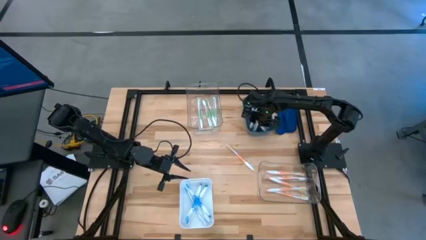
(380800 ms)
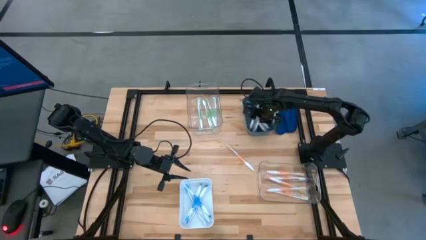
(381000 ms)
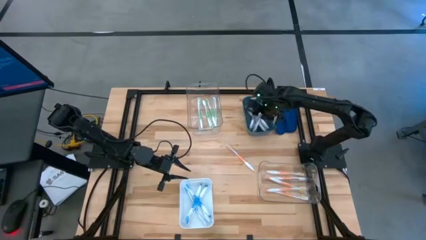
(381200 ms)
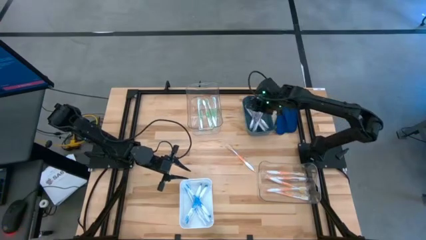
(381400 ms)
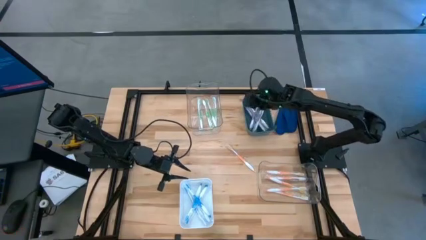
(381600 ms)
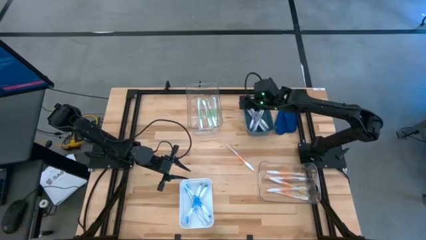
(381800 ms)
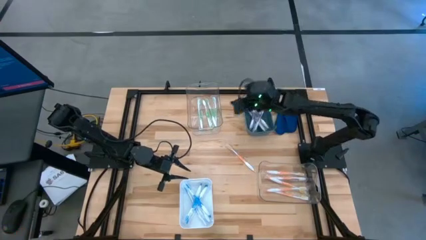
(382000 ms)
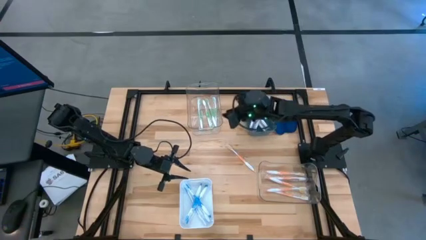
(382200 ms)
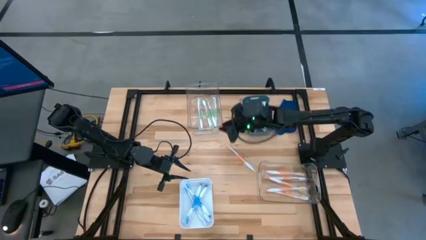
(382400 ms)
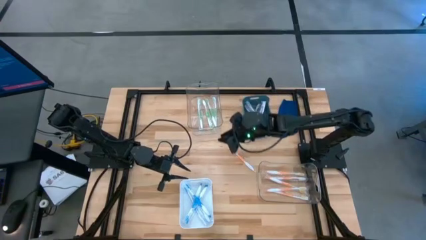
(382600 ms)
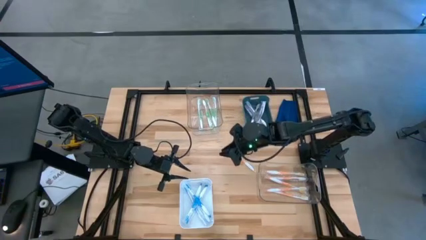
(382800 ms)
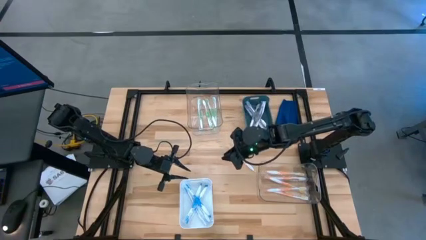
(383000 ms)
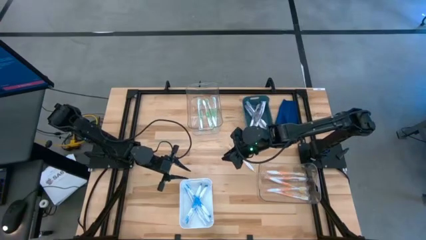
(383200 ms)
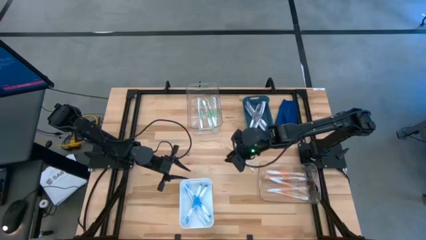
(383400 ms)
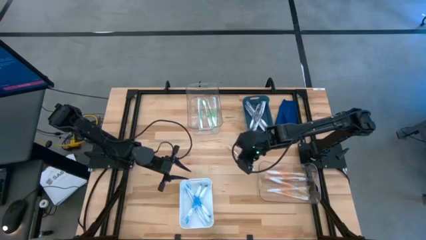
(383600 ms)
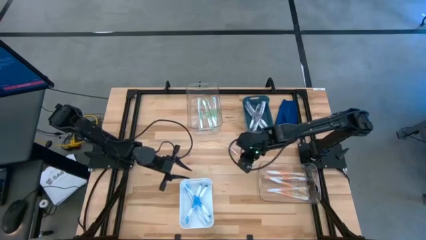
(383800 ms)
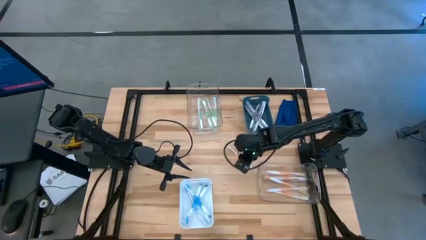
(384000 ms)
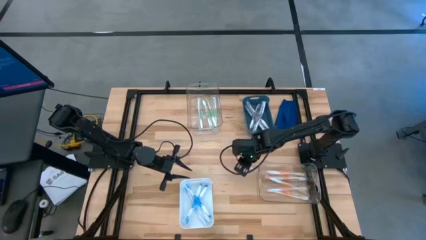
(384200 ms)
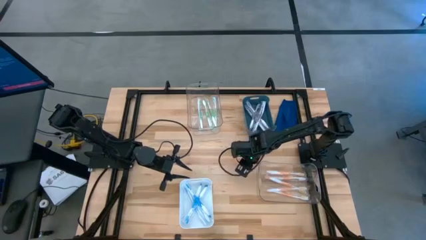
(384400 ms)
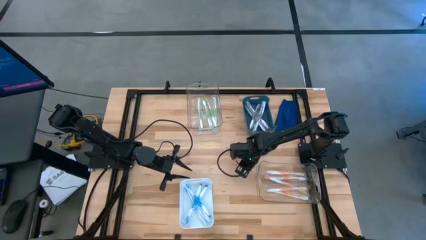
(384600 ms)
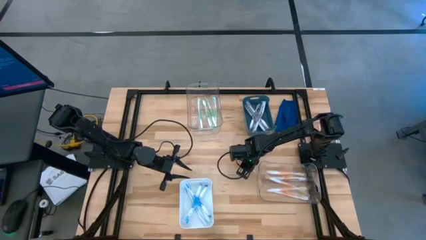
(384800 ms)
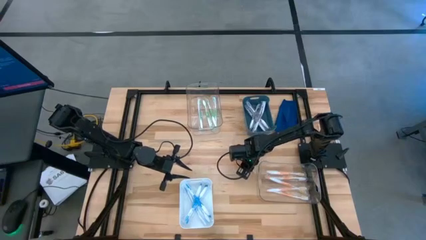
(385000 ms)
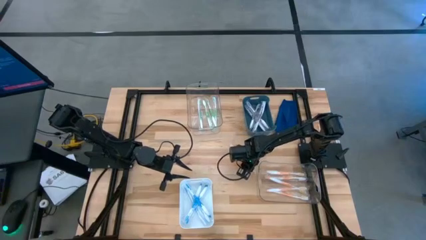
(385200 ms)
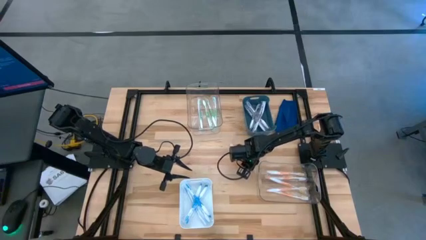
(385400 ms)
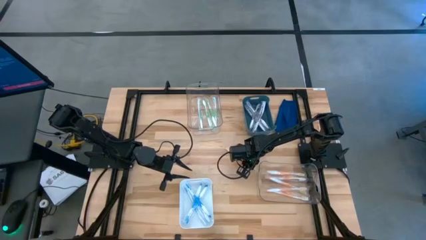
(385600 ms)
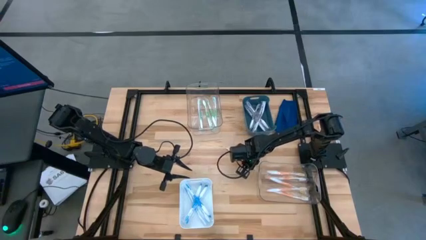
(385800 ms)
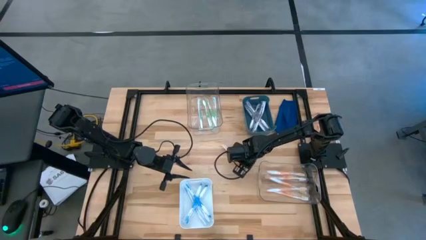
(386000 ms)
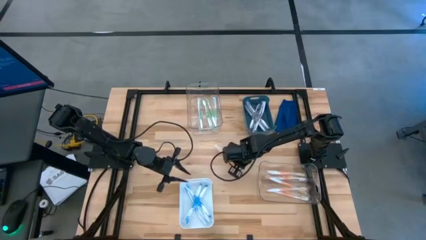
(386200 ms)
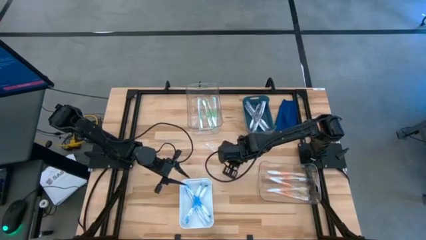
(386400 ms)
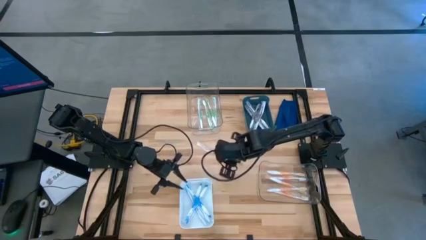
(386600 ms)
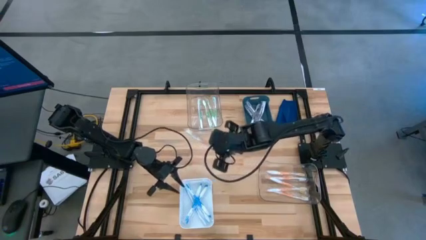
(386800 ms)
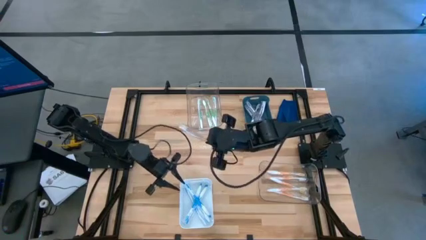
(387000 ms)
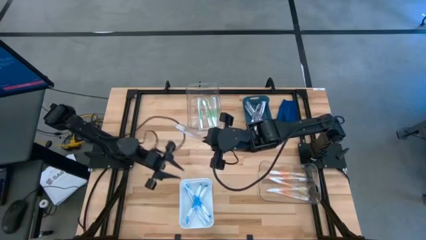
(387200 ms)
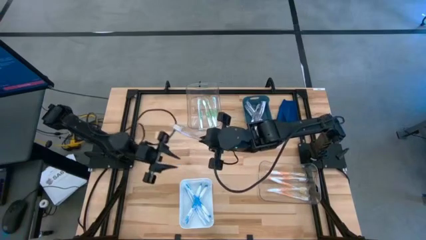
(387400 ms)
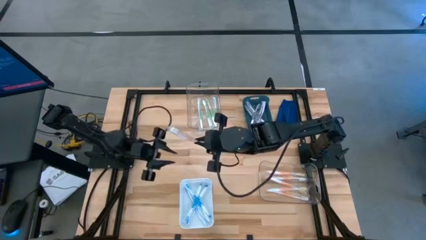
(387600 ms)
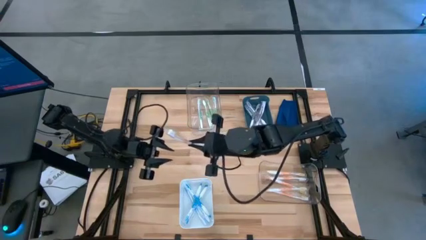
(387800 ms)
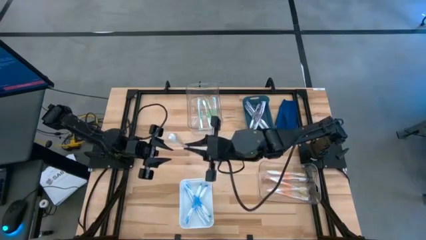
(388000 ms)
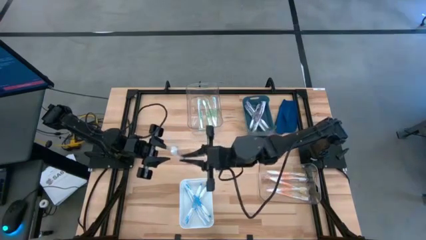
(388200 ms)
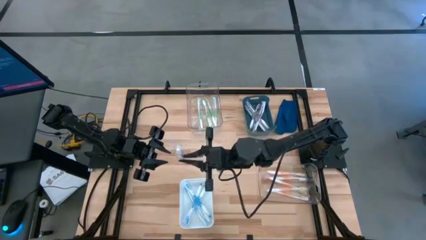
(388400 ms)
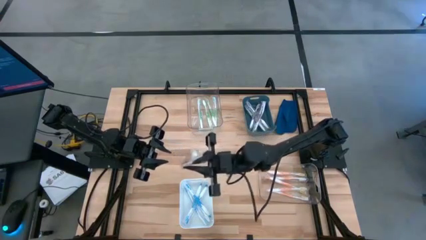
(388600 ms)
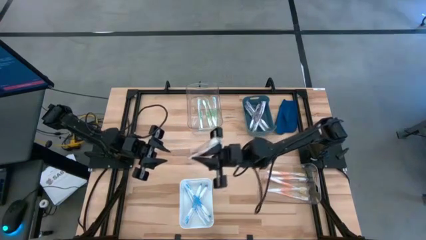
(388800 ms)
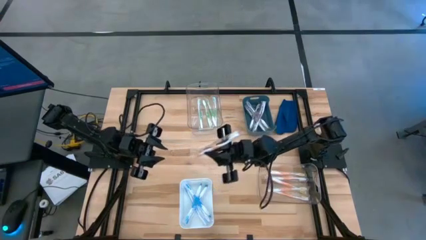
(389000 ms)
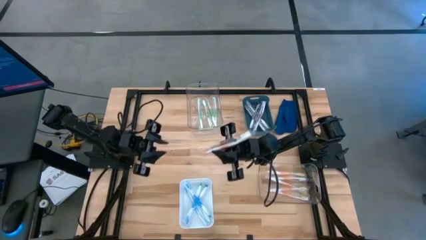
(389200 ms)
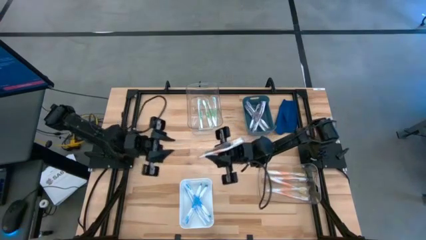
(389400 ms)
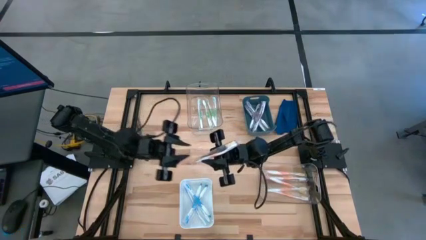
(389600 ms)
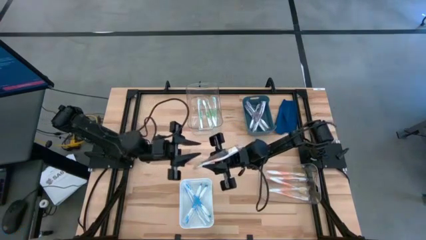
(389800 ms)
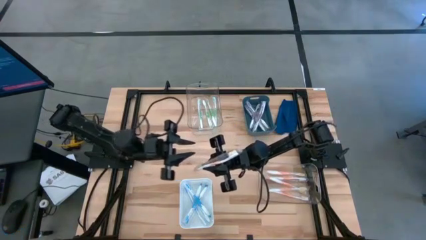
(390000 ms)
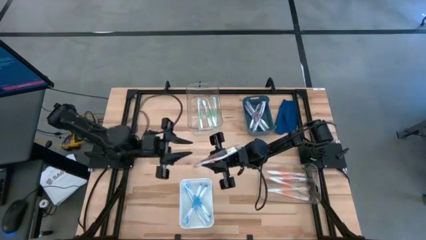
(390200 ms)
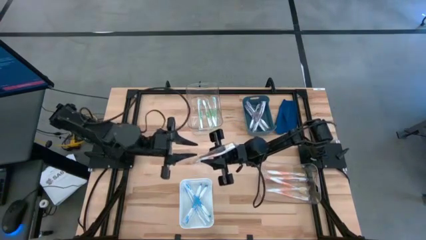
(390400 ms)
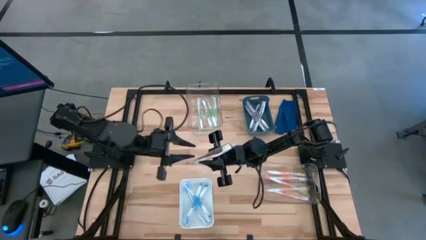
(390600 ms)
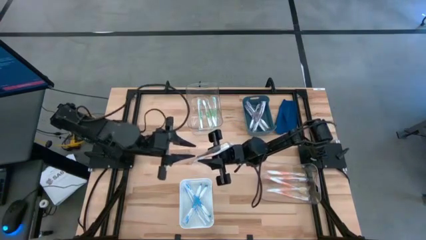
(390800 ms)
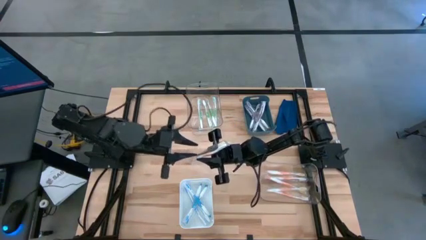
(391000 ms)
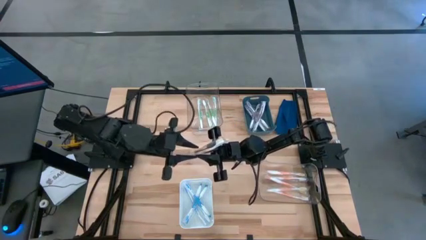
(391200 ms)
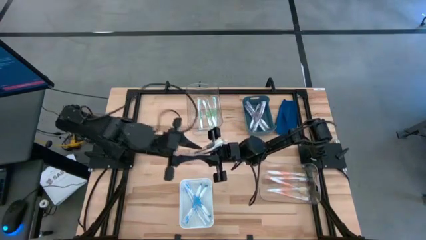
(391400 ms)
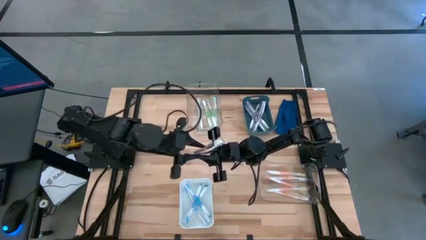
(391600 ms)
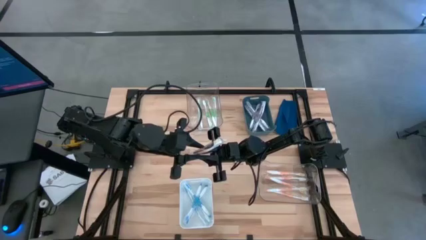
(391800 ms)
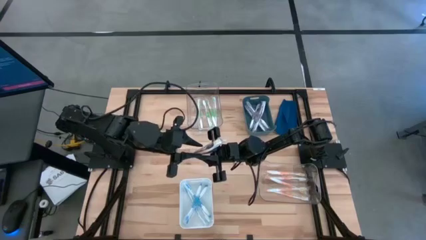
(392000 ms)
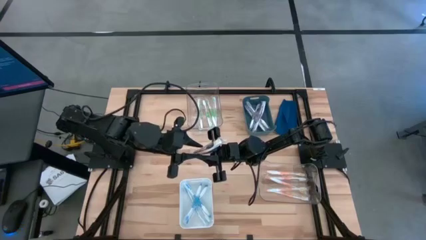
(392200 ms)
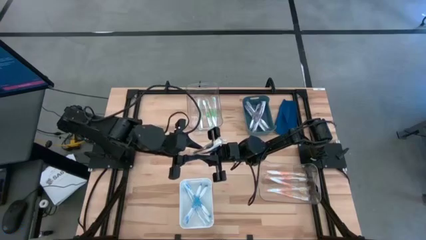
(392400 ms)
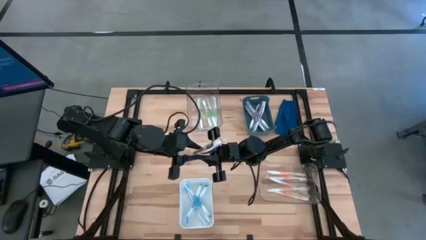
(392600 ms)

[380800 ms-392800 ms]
Task: Pick & Place Toothbrushes
Put the orange toothbrush into the bottom transparent bin

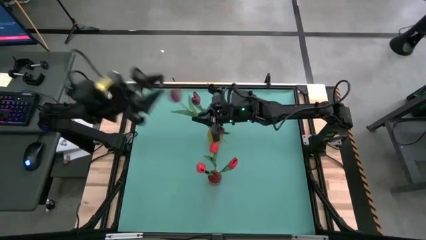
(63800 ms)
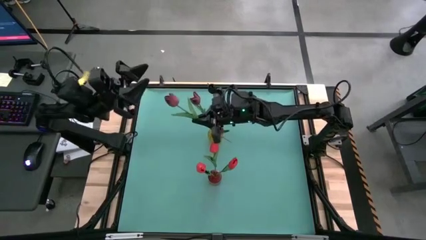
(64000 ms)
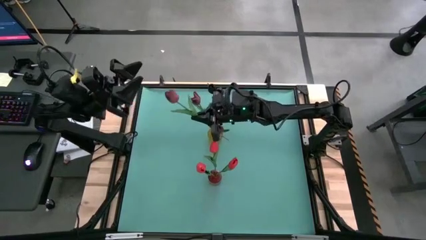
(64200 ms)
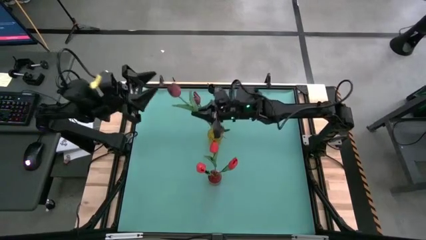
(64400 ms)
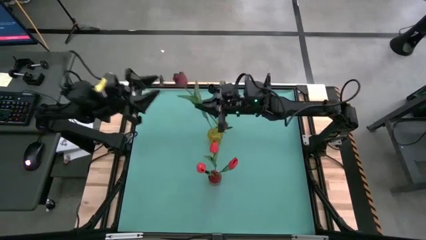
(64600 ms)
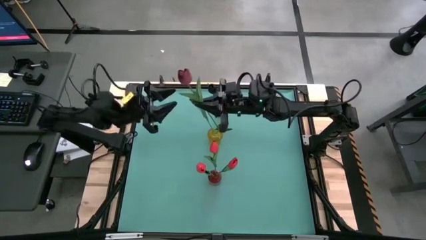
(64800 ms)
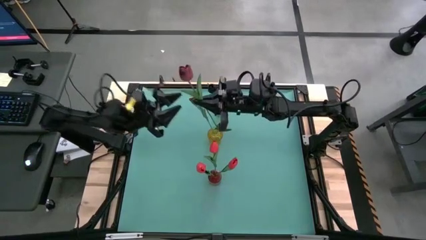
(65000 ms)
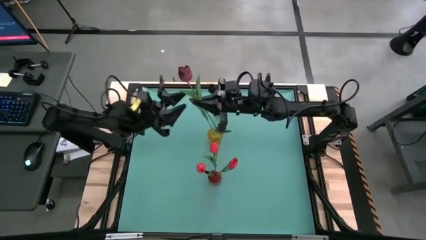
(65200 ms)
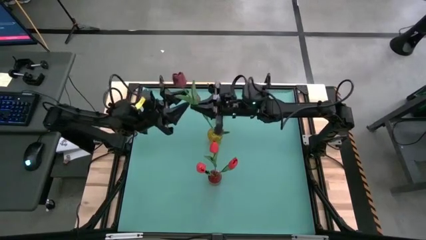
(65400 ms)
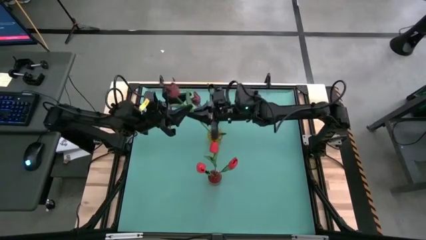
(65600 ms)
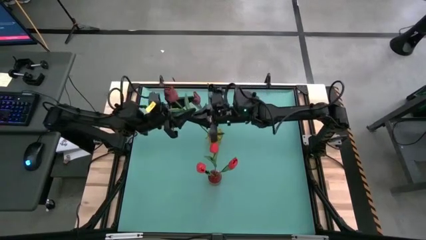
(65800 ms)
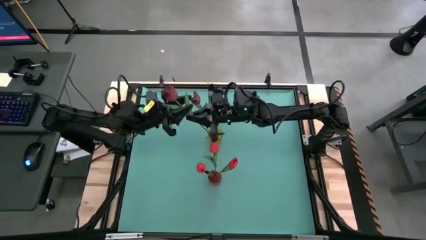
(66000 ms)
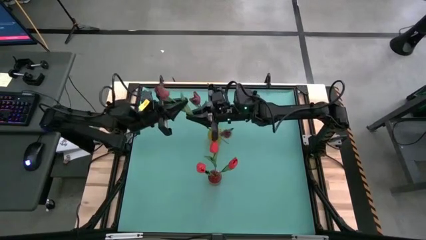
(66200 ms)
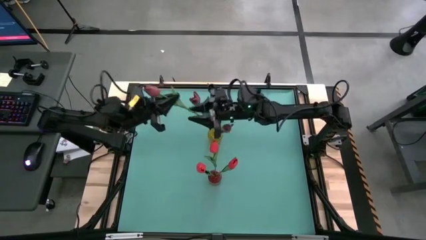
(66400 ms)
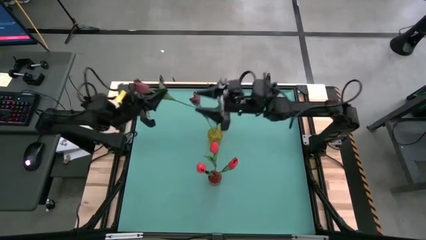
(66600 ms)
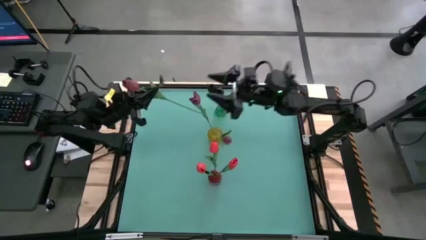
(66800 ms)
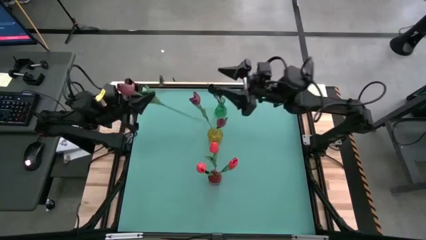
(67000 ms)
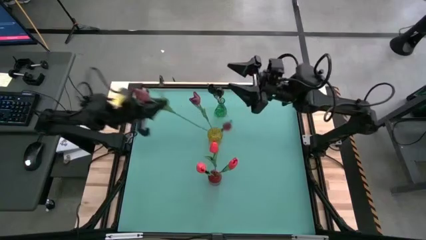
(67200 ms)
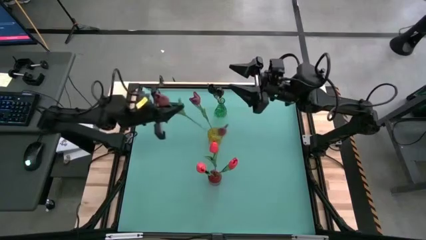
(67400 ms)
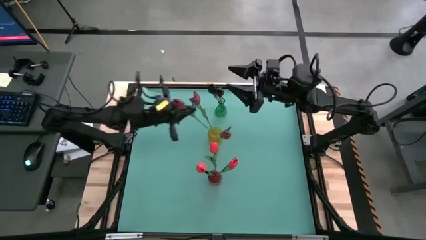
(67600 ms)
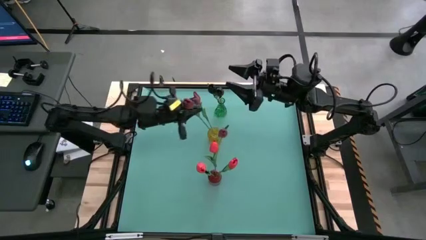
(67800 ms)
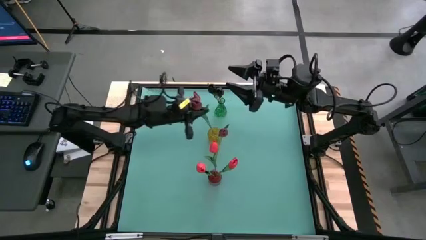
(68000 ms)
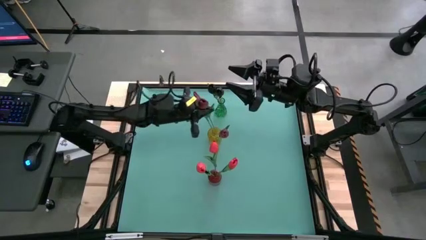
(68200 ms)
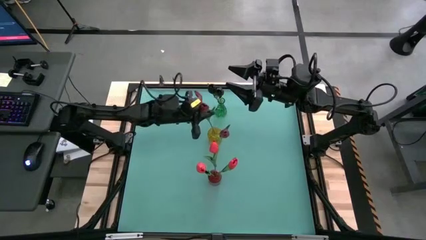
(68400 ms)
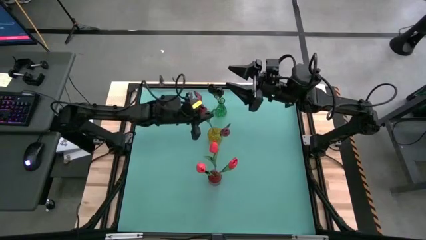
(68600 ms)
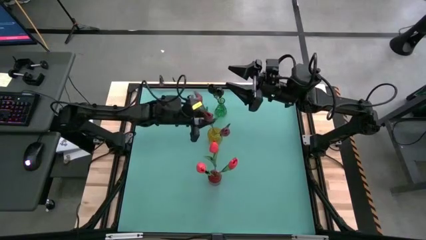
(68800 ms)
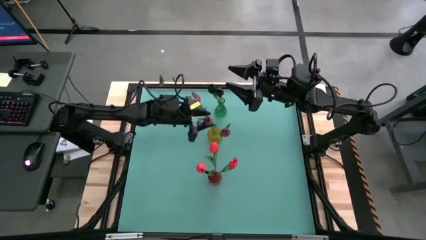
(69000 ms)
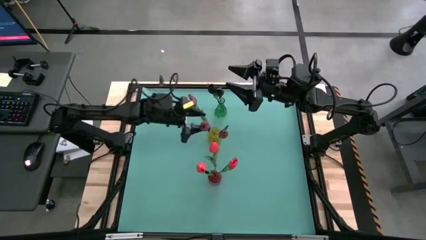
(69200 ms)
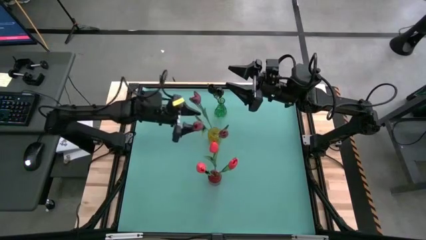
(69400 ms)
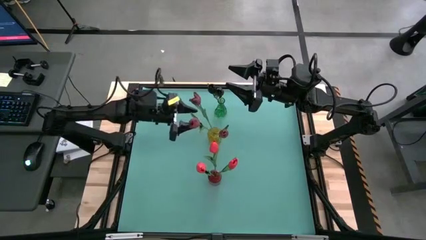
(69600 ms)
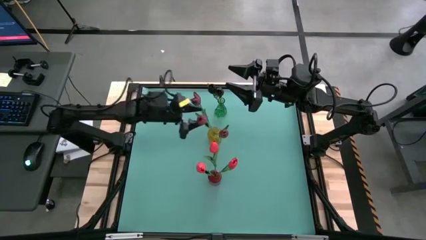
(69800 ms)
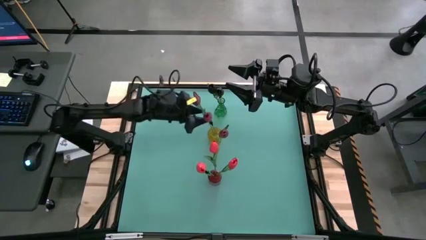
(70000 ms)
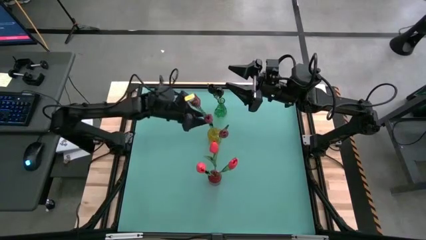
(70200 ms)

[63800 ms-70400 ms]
Task: Sort flowers into vase by color
Put the red flower into the yellow flower vase
